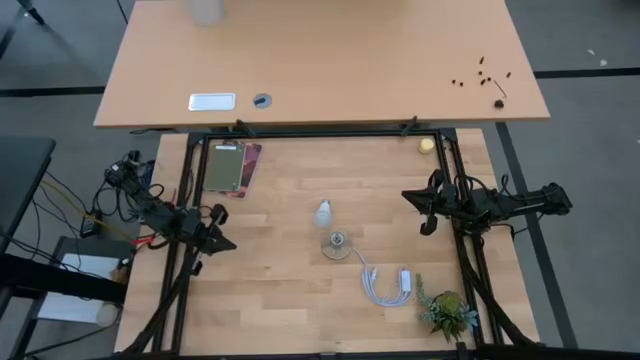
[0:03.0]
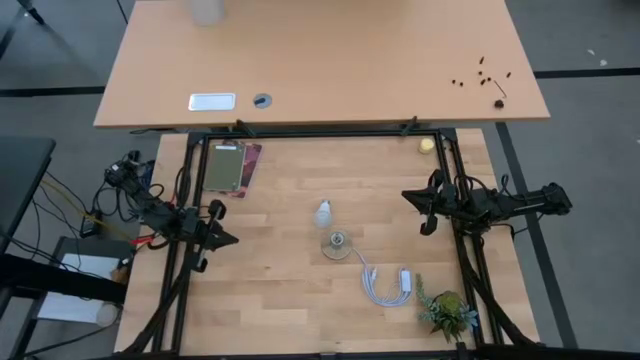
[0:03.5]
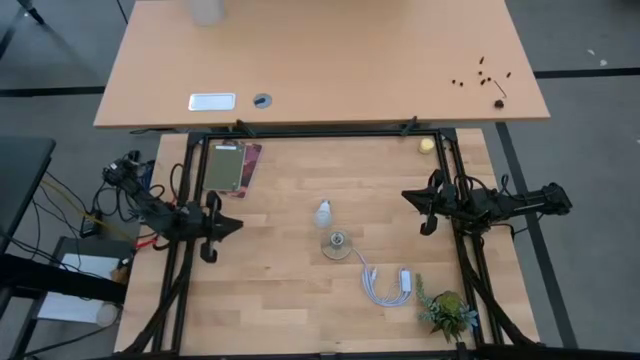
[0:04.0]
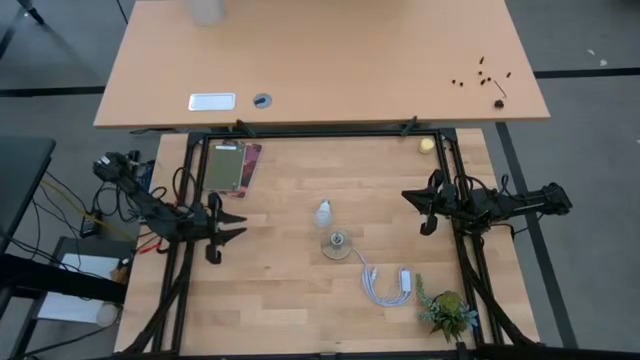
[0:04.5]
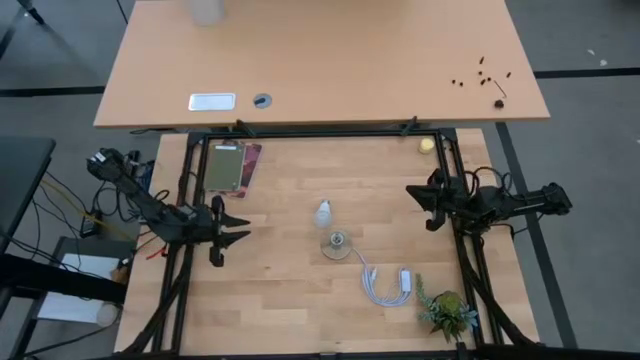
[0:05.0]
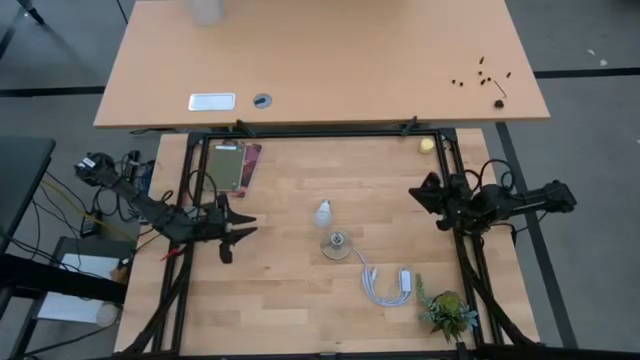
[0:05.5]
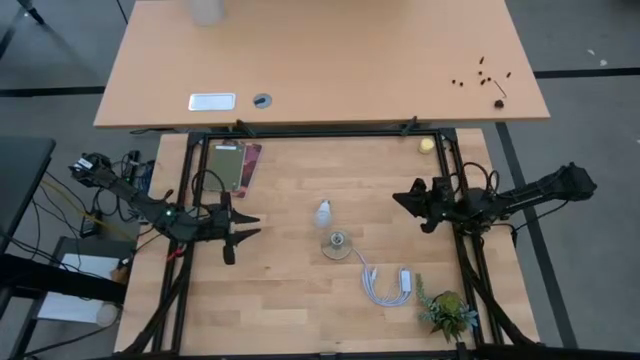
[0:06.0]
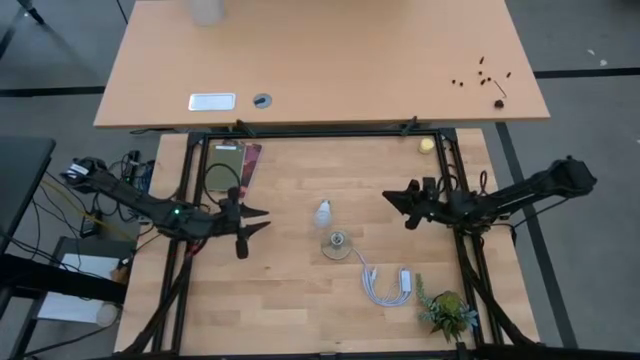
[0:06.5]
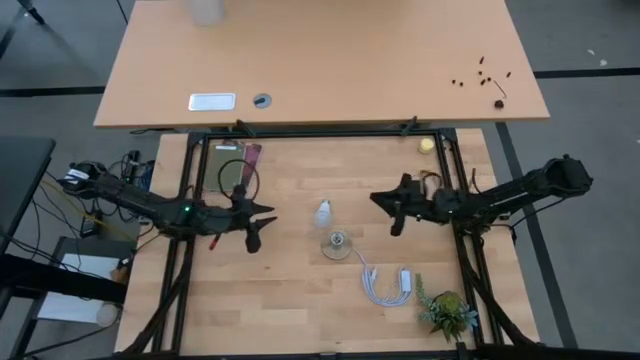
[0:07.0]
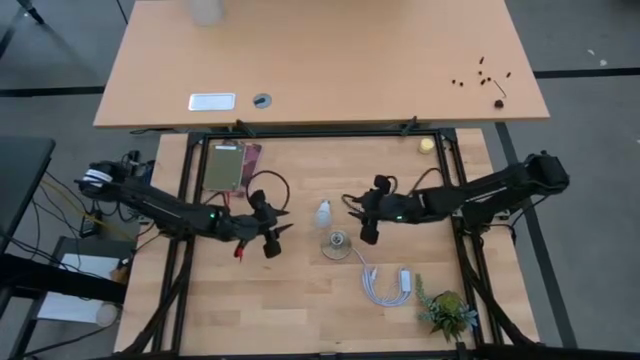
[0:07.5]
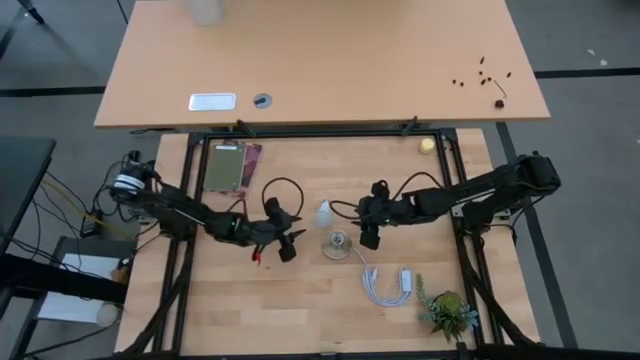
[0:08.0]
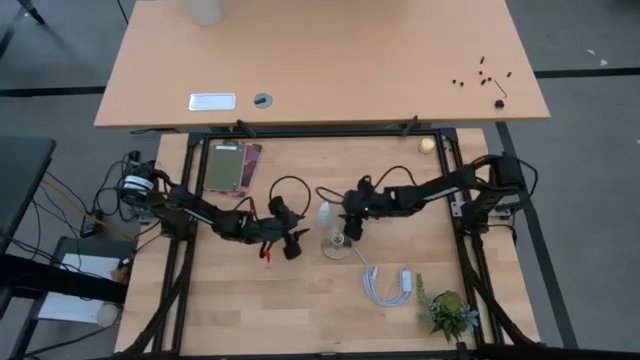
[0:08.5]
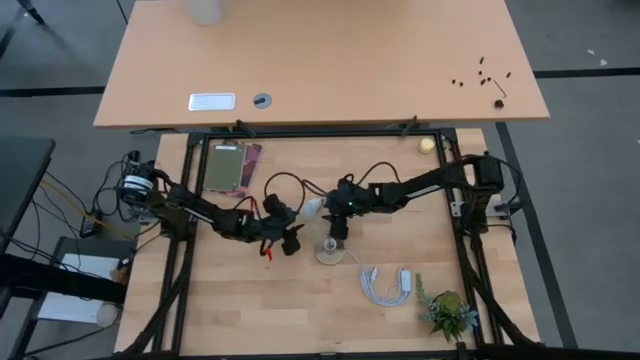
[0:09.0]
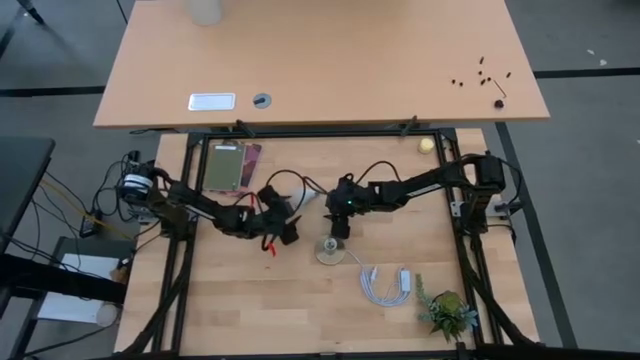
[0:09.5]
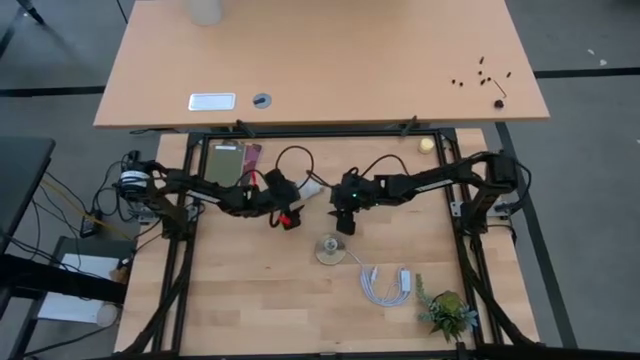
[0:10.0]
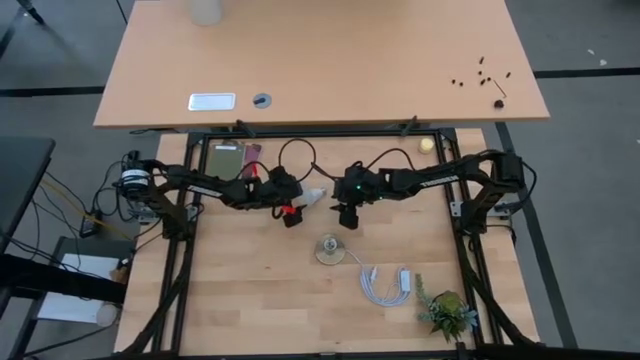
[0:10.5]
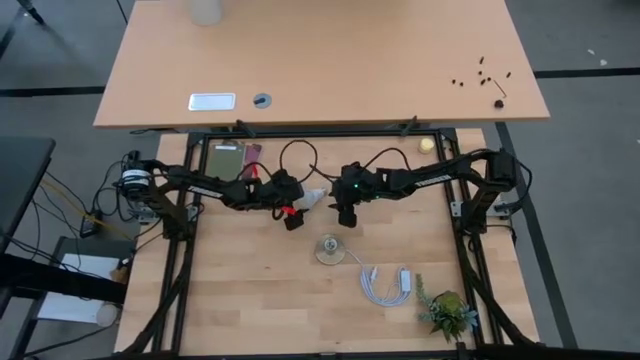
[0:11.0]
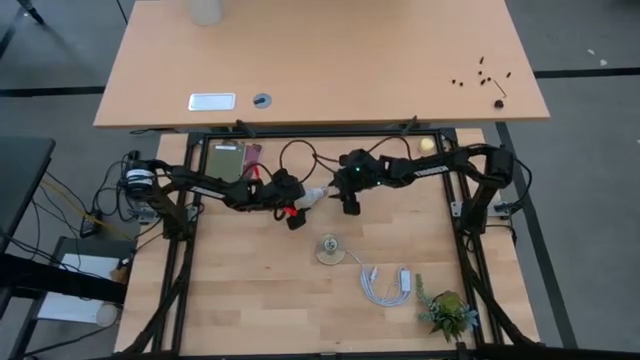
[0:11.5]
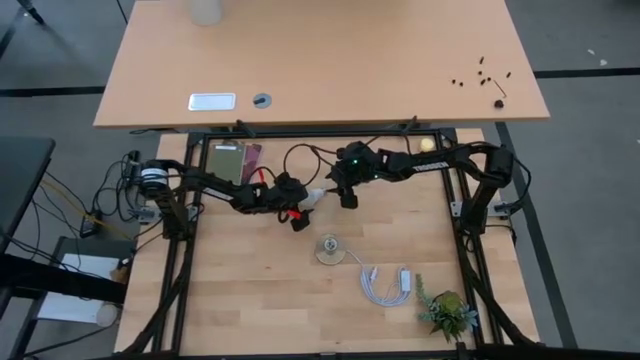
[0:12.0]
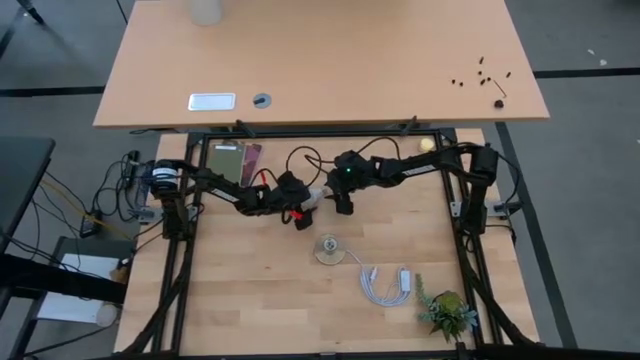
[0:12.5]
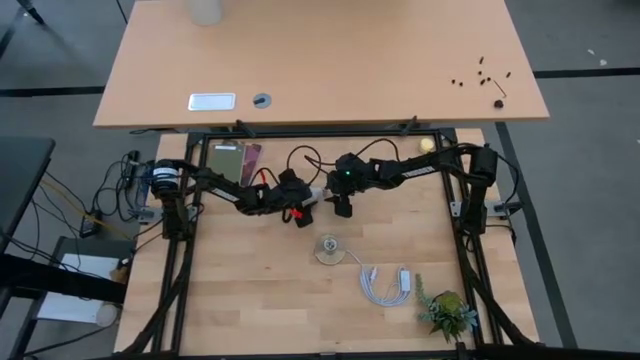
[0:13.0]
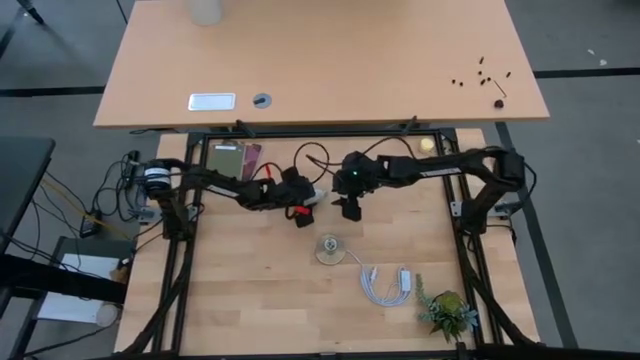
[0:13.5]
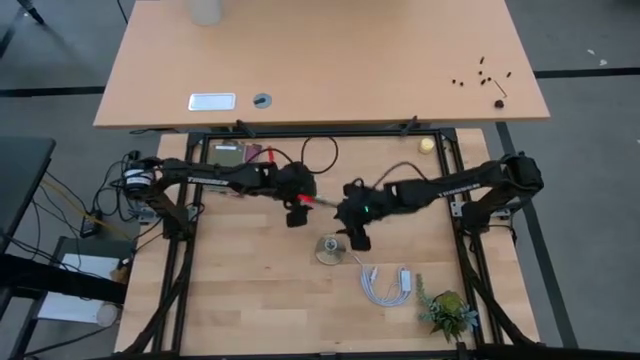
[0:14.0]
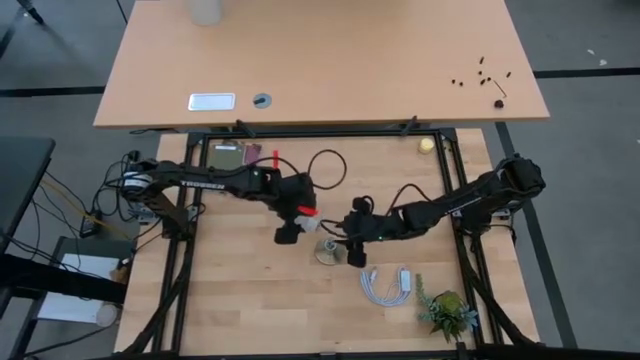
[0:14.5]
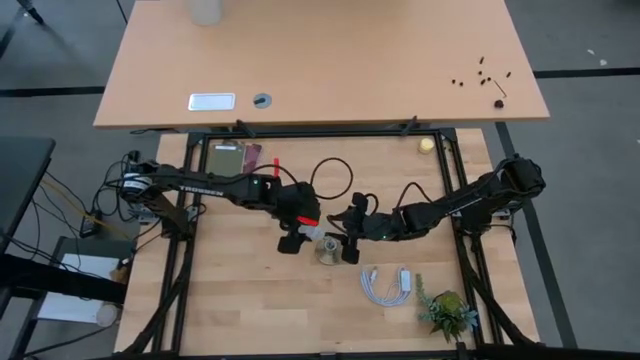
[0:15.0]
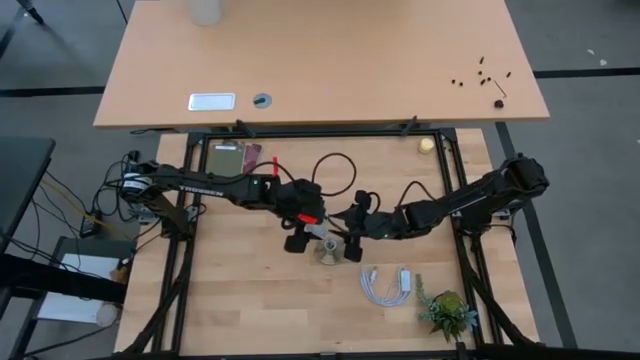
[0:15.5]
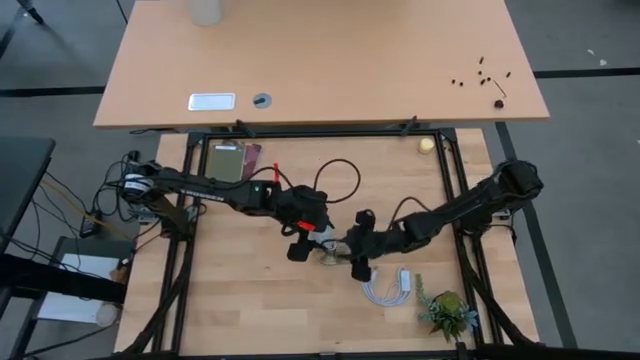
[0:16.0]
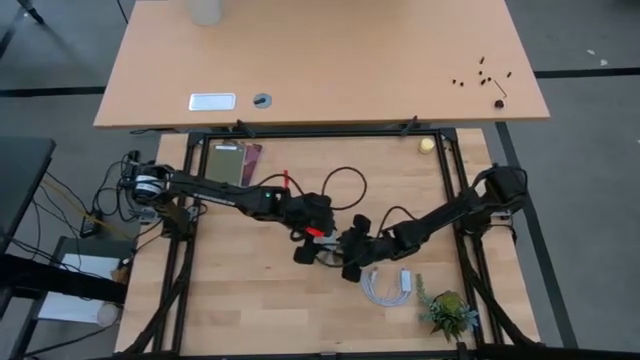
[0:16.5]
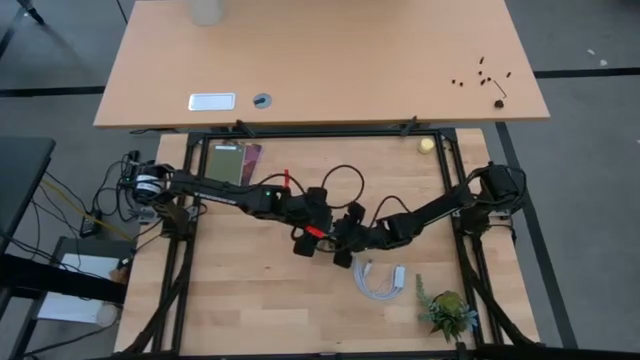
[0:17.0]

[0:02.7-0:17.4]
Task: Screw lightbulb
Insert the white lightbulb into the desk lamp

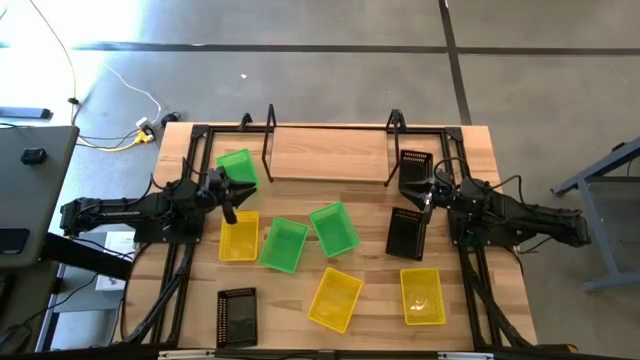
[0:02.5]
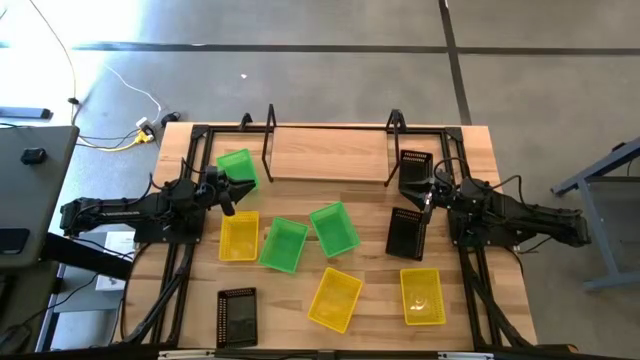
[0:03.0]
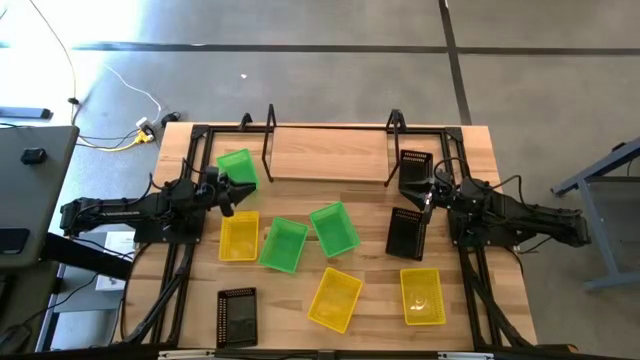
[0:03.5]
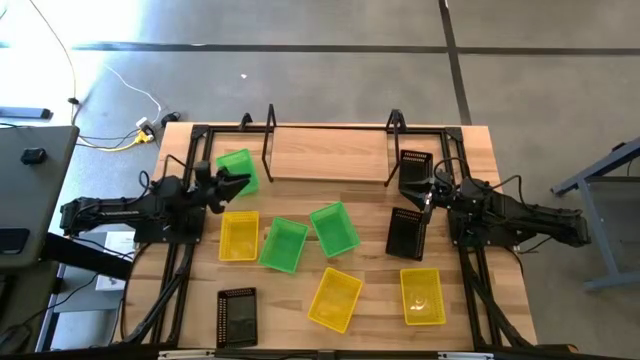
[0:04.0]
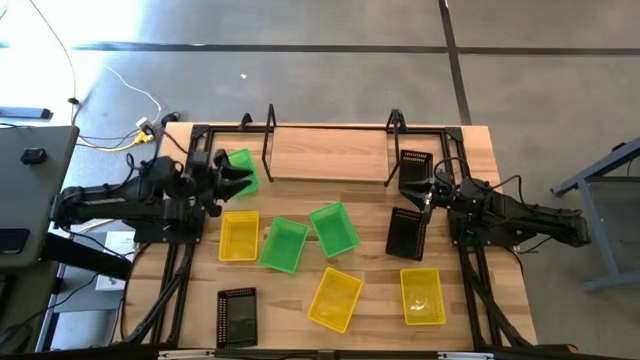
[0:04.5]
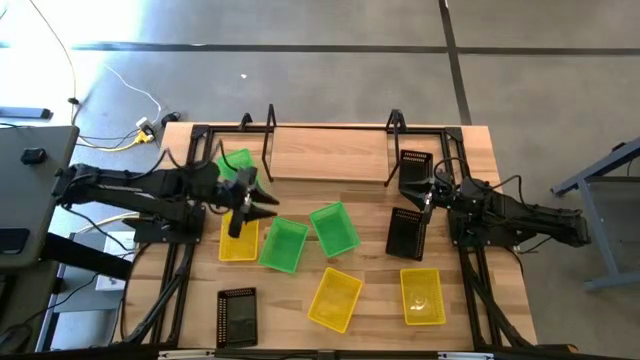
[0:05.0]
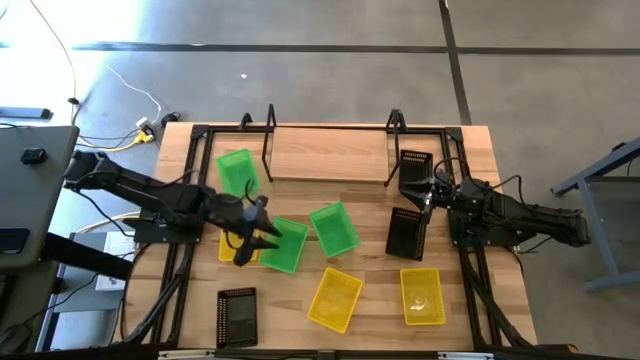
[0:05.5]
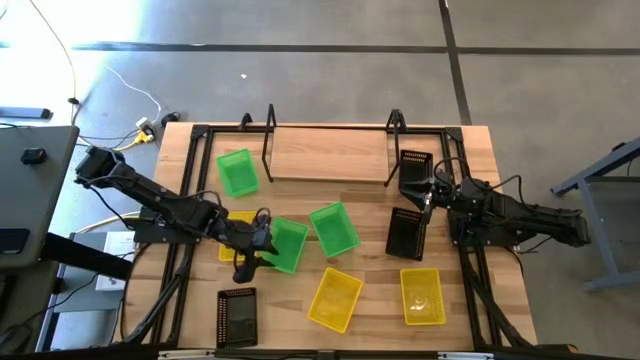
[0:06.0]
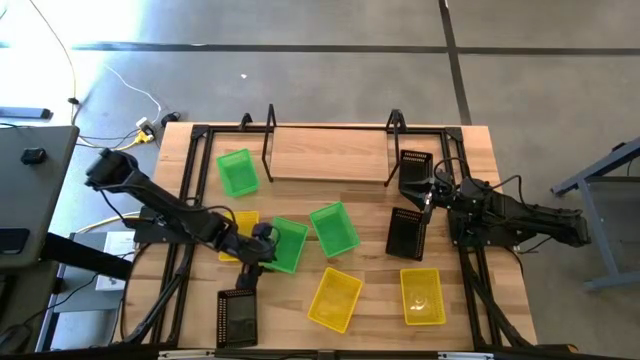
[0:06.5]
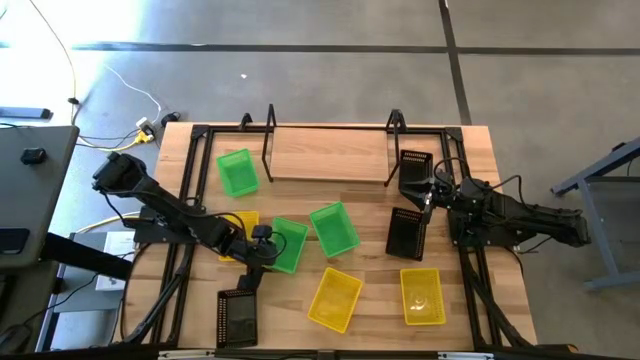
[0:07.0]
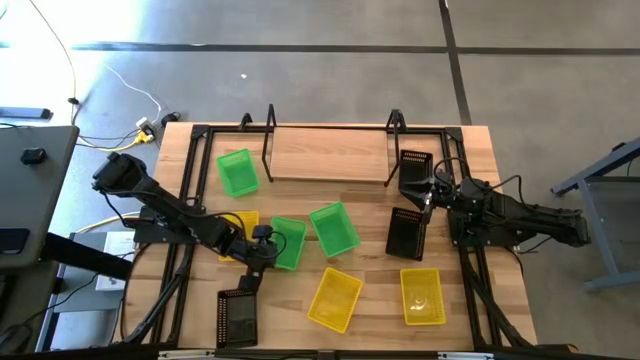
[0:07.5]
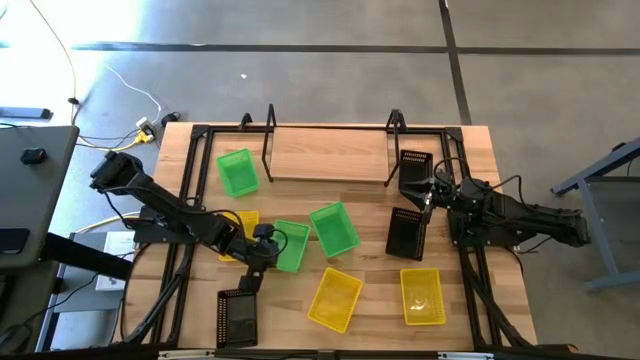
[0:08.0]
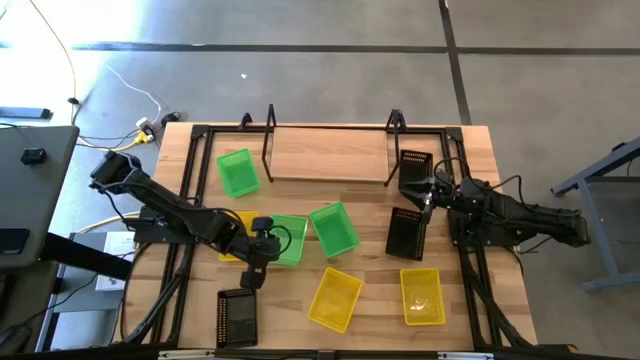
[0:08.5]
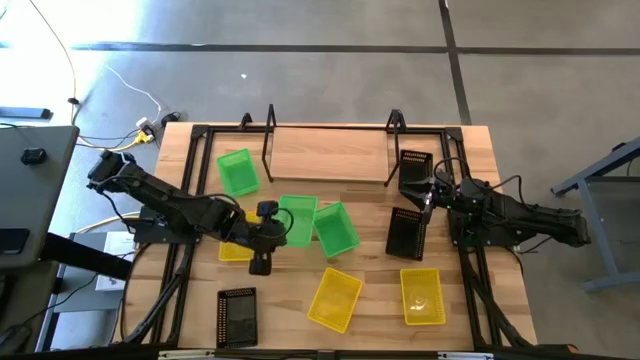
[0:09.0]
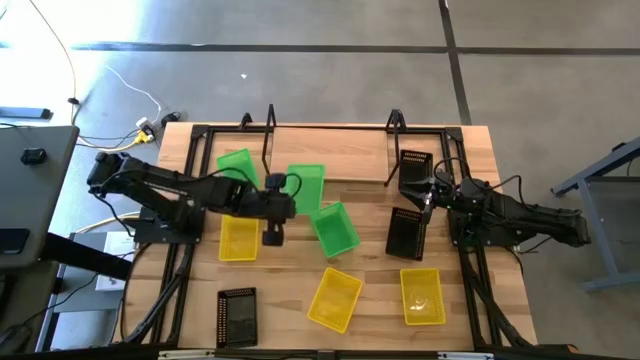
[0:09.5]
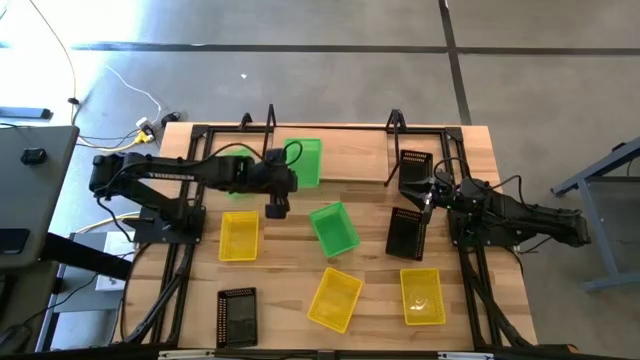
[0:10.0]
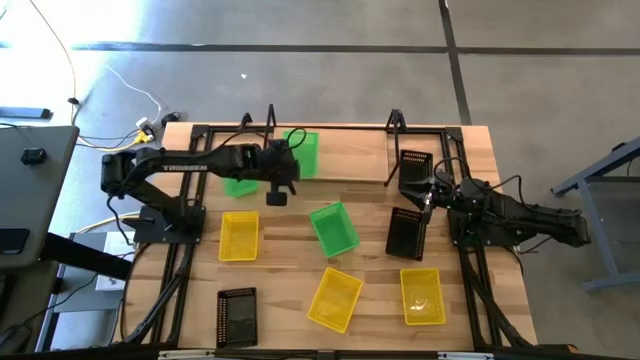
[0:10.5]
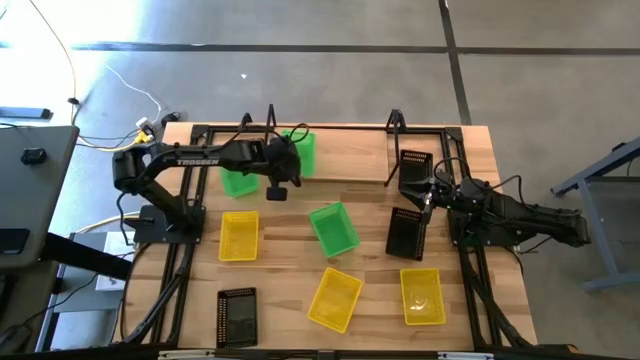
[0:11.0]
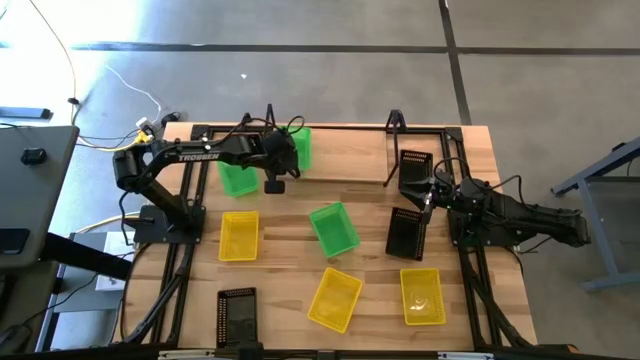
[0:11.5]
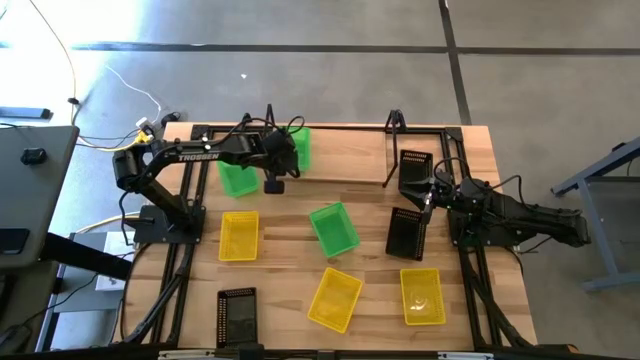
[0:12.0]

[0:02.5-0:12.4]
Task: Stack baskets on shelf by color
Put the bottom left green bin on the shelf
